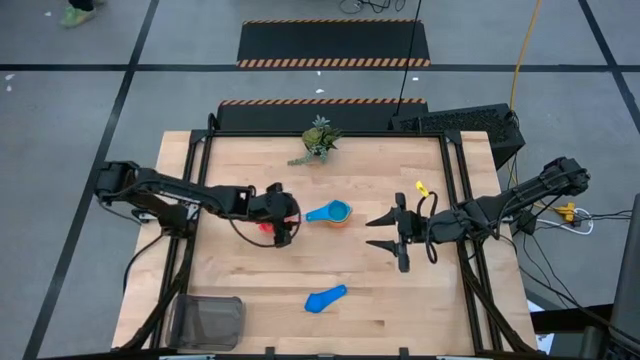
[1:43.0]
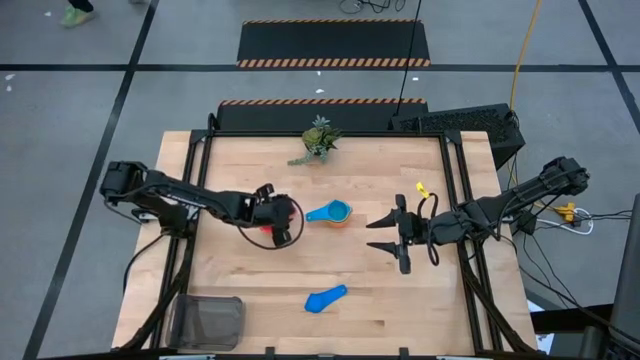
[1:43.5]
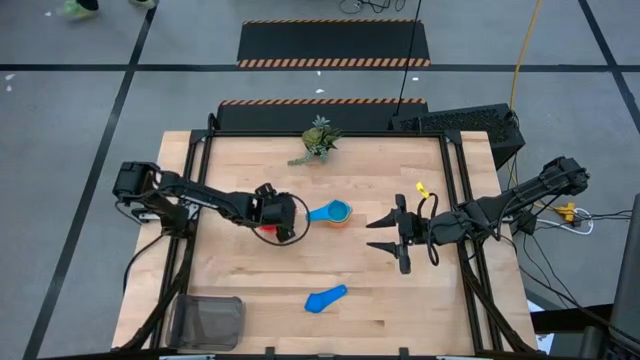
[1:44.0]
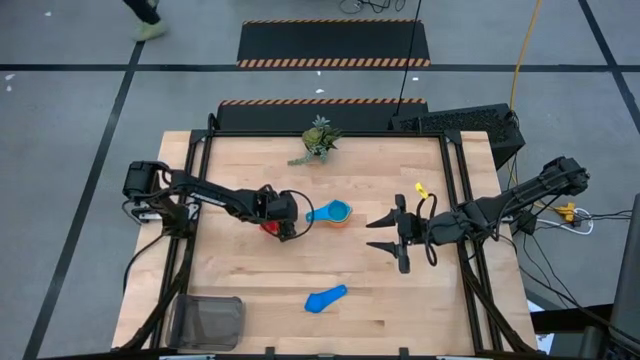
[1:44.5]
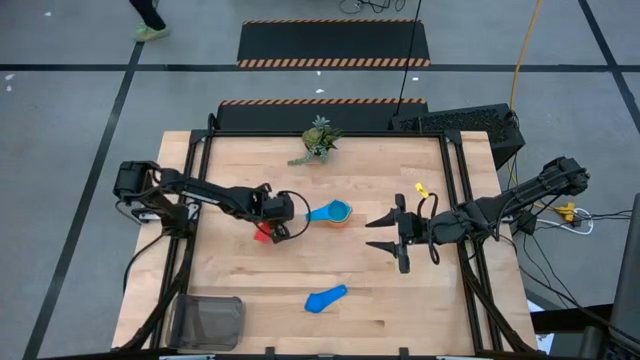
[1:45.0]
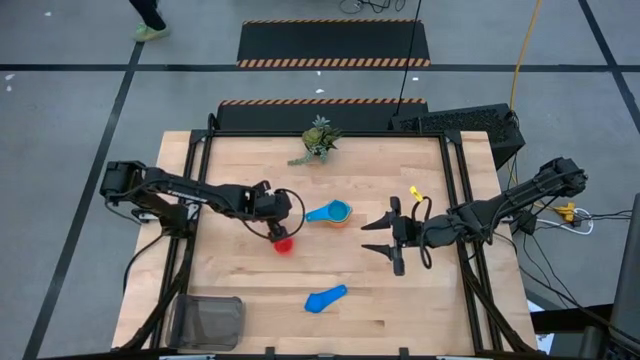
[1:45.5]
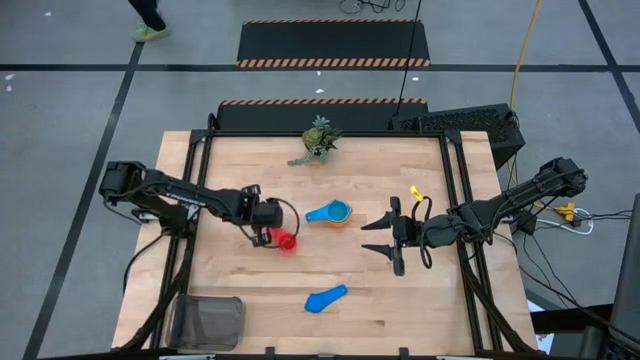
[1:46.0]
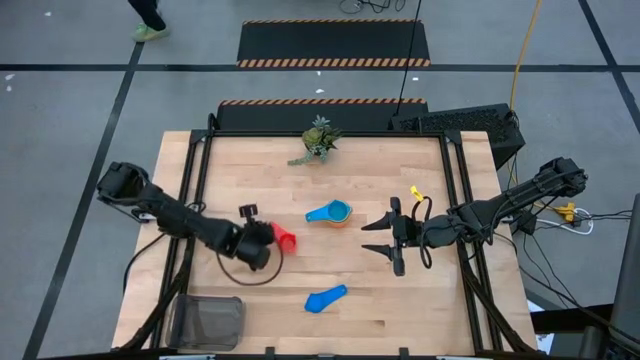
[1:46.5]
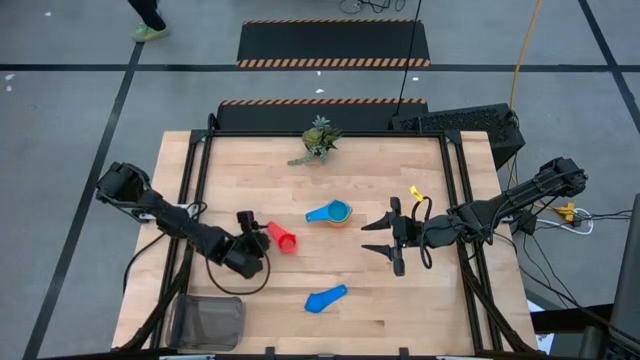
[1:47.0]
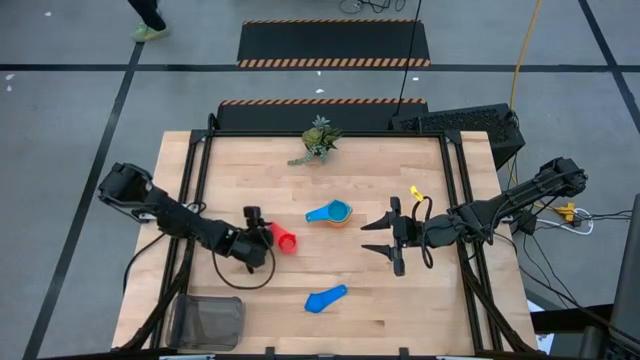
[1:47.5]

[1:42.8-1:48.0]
Task: Nest measuring cups in basket
Stack the red measuring cup on top of the light blue measuring cup

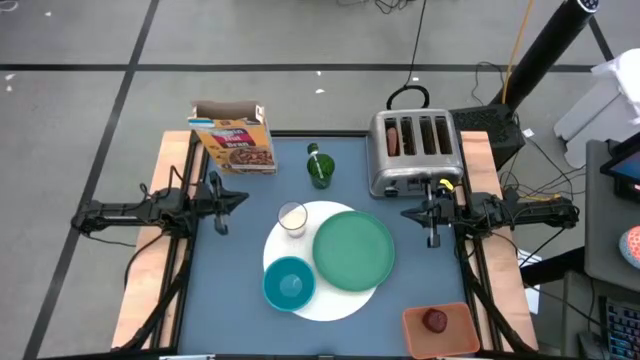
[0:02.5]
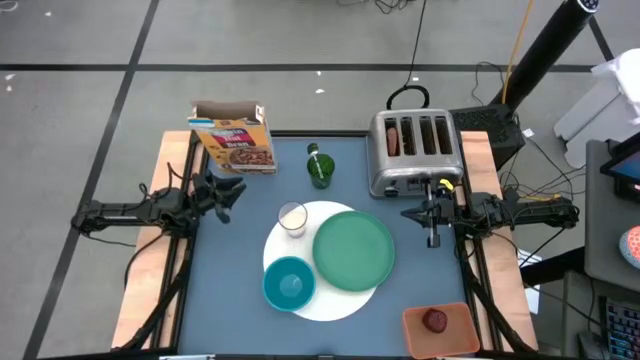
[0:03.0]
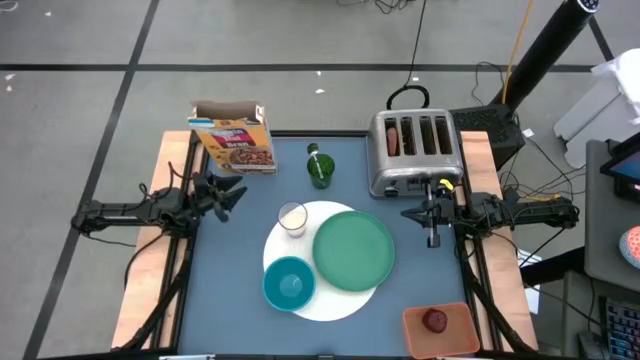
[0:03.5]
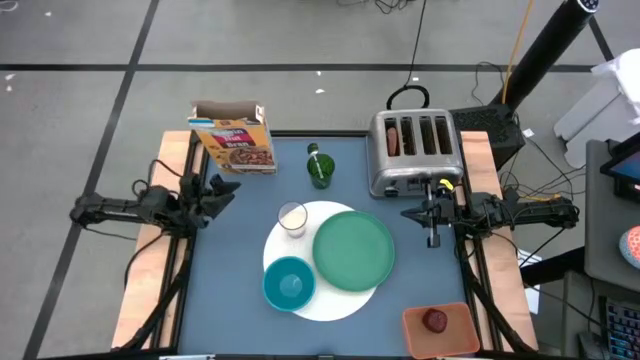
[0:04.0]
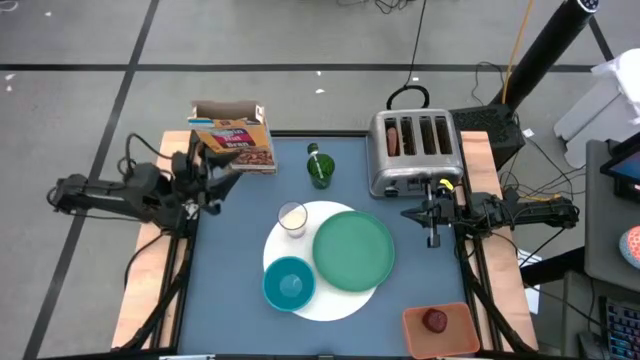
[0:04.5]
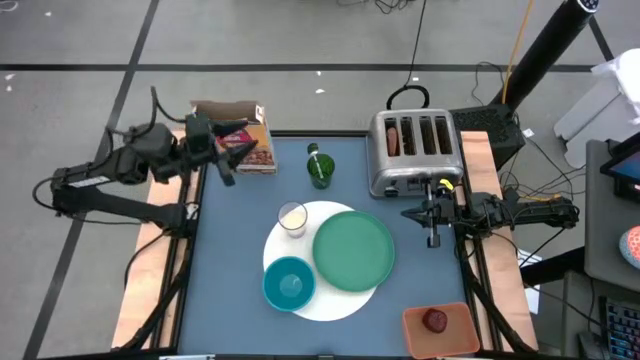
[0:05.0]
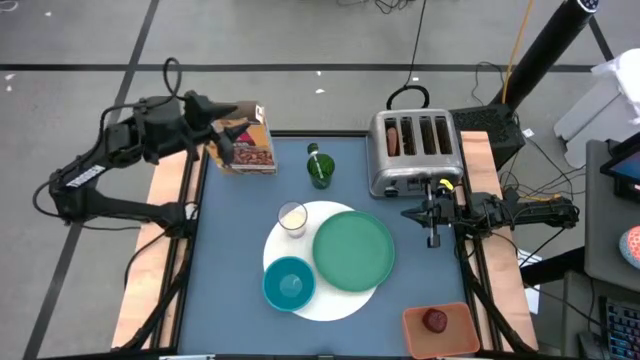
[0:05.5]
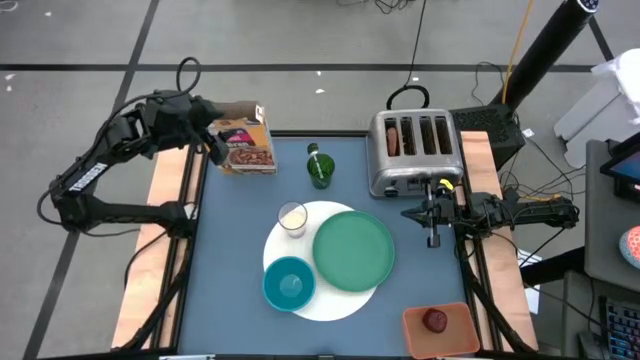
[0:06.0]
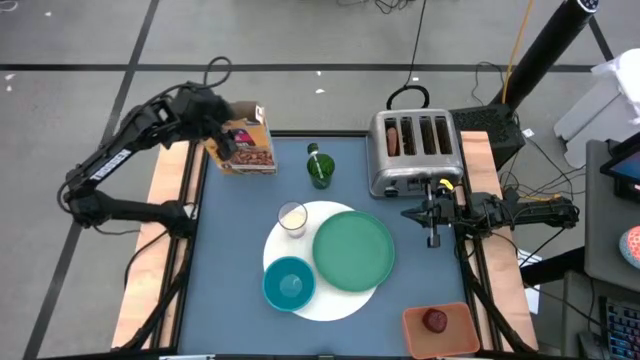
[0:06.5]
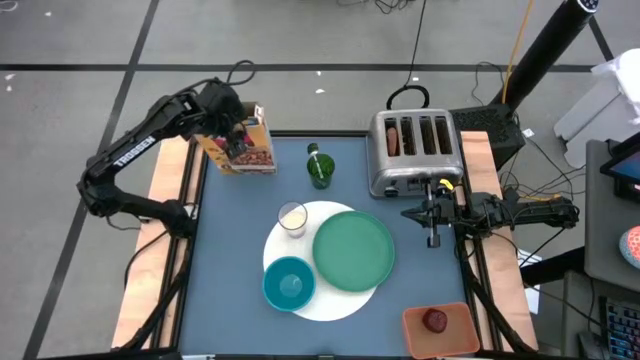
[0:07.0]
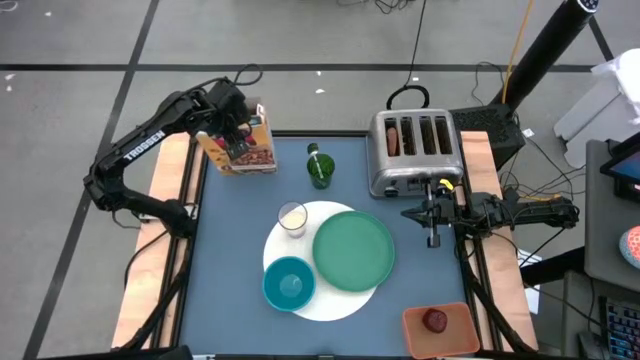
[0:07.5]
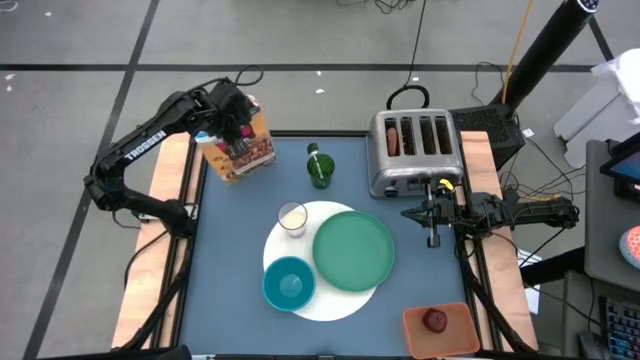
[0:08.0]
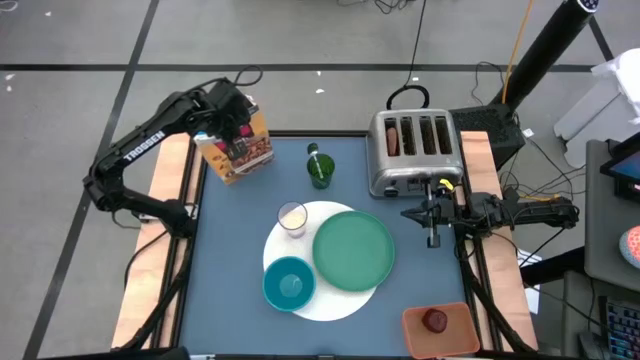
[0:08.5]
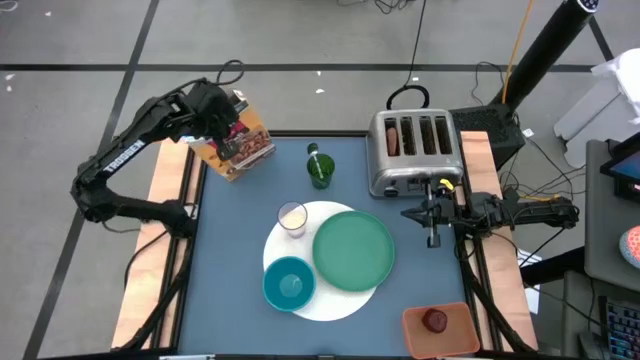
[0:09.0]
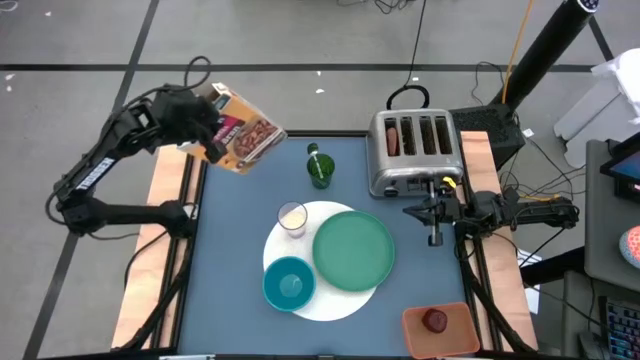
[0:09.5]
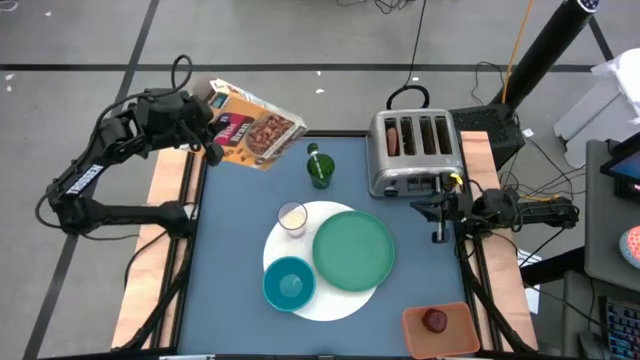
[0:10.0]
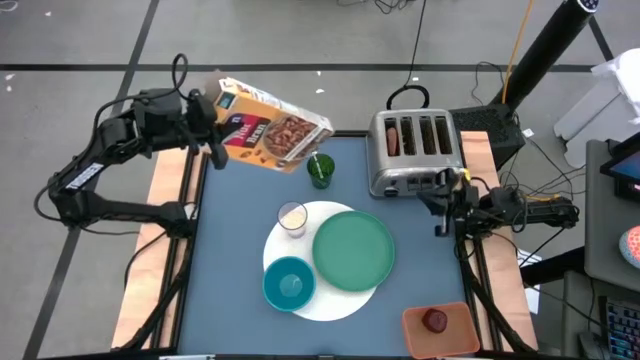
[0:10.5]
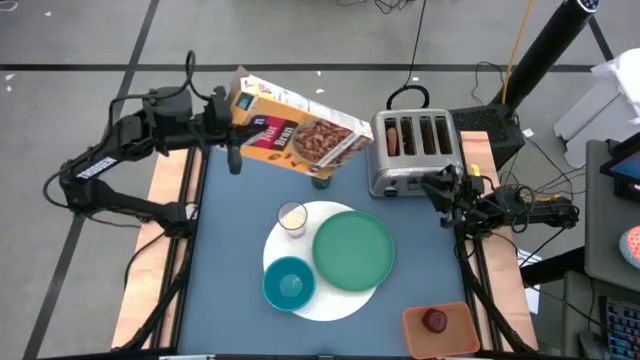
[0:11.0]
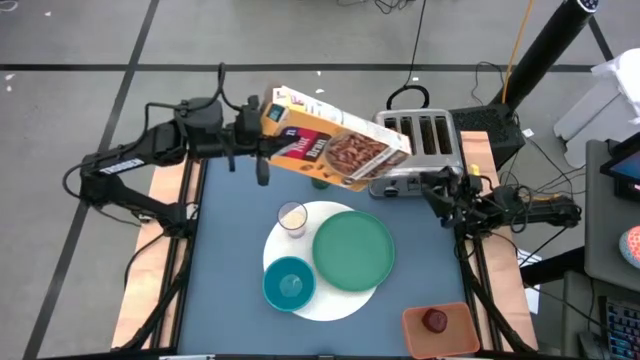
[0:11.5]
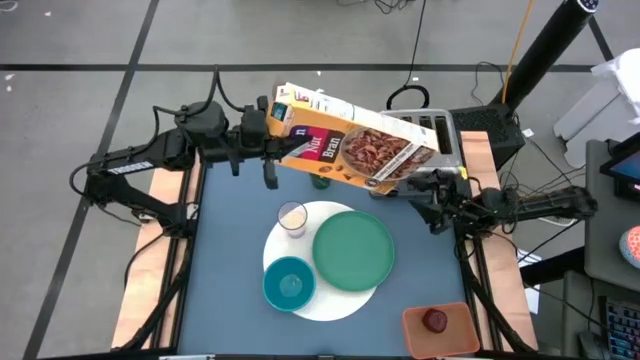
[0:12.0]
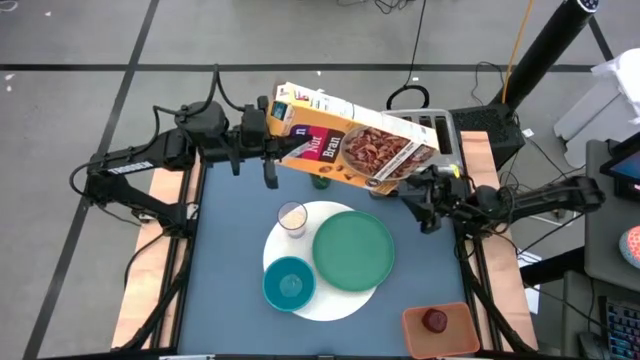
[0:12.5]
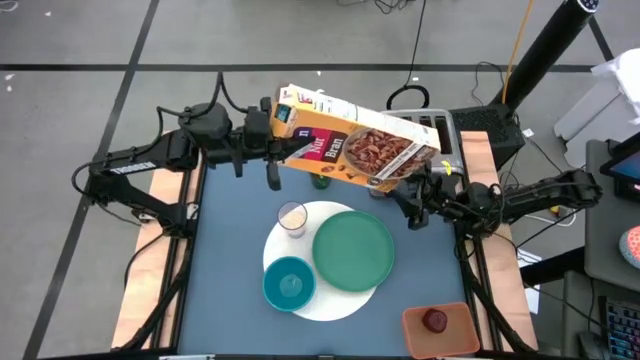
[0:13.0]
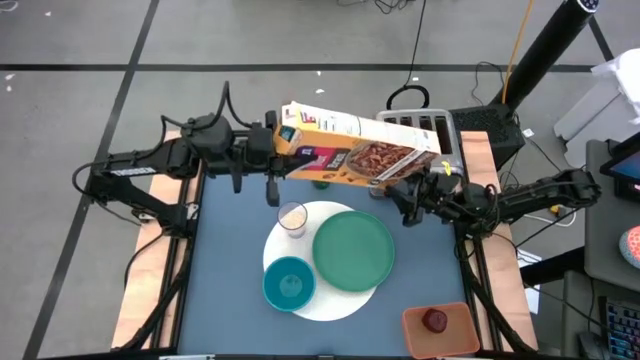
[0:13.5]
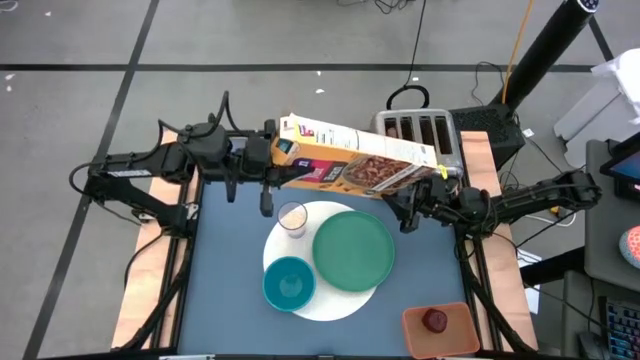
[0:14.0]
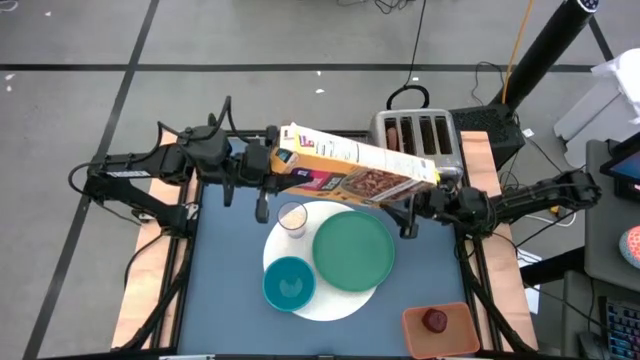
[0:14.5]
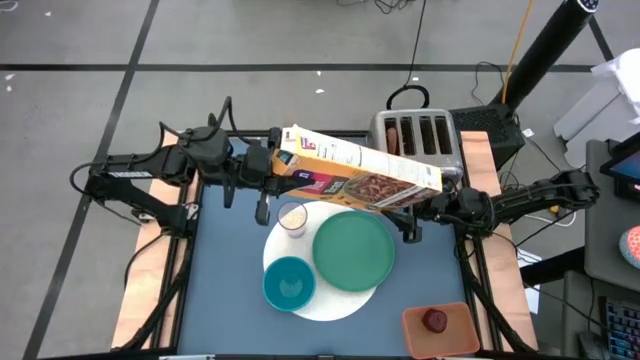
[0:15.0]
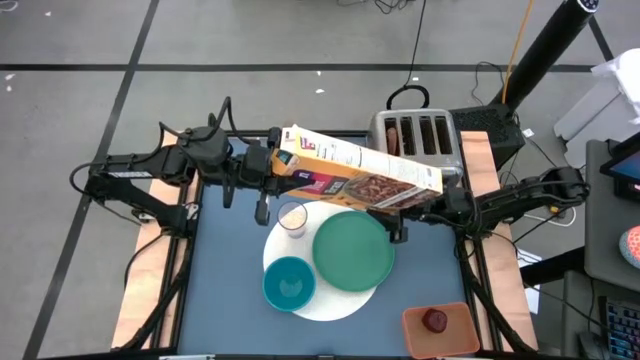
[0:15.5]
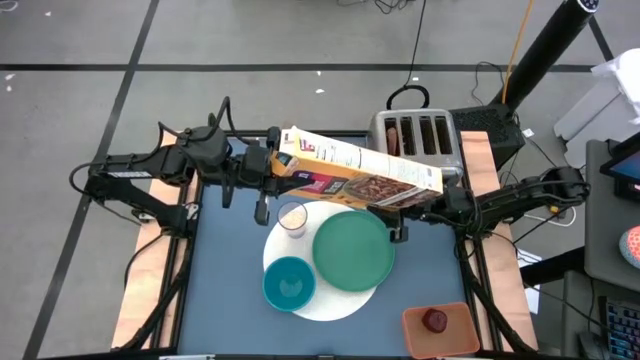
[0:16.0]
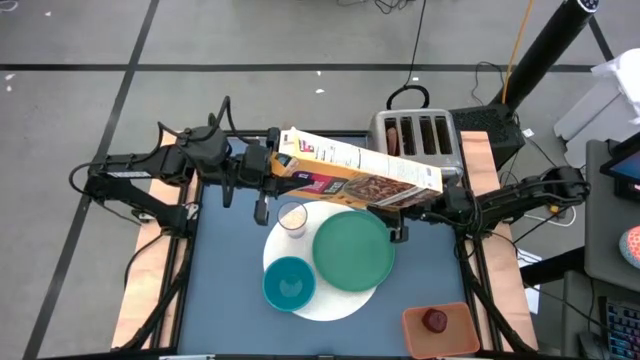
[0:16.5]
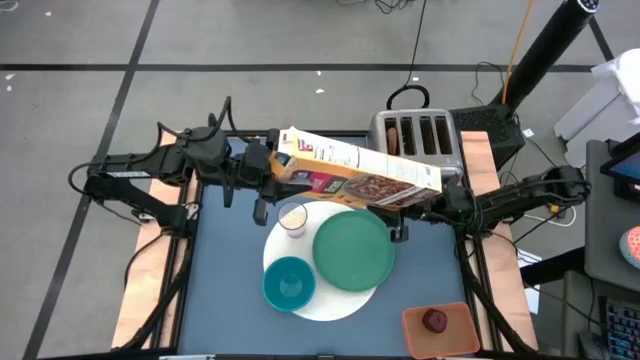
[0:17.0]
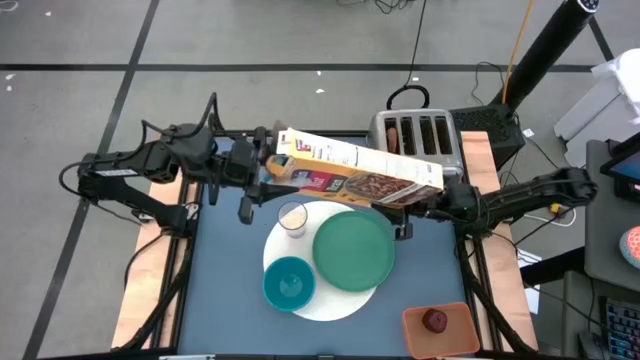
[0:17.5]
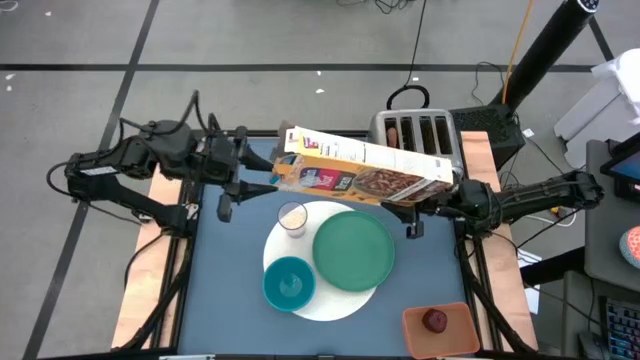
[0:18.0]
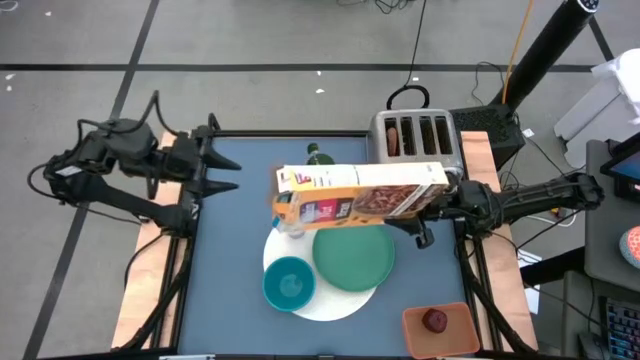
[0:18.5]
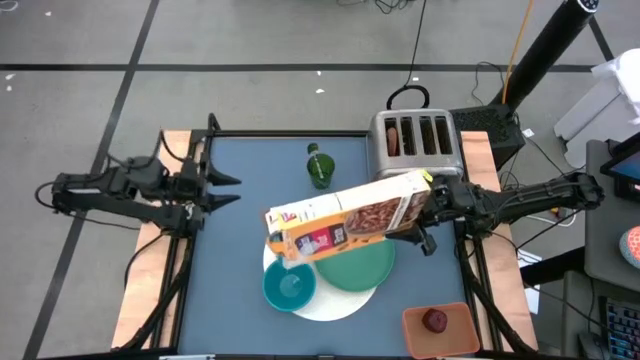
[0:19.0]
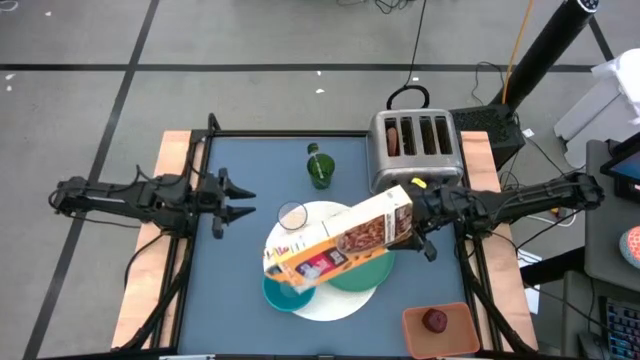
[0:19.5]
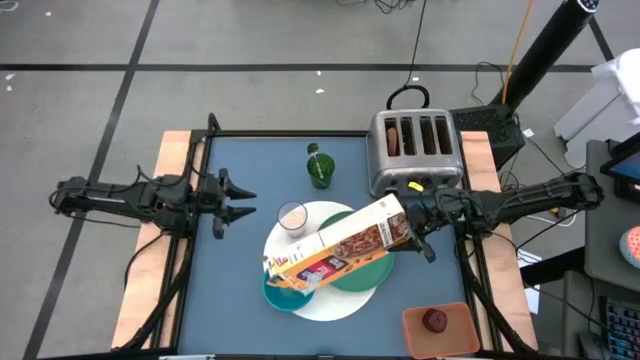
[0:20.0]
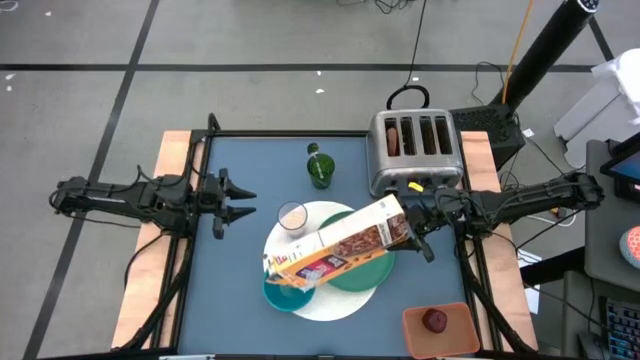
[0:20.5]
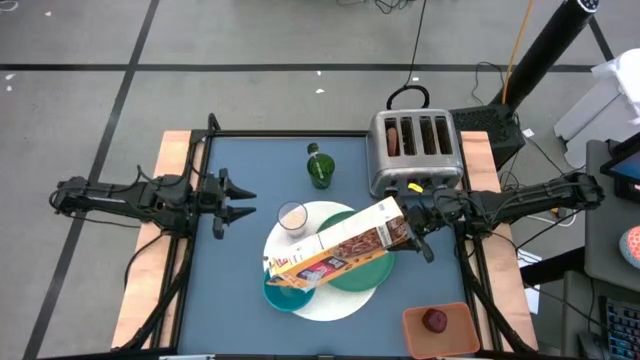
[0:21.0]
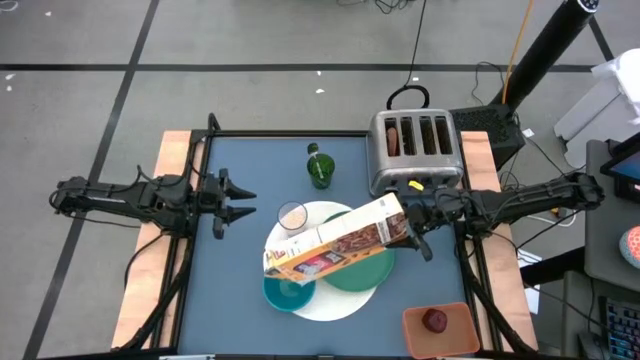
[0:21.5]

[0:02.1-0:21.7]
Task: Arrange a breakfast setting
Pour the cereal from the cereal box into the blue bowl
